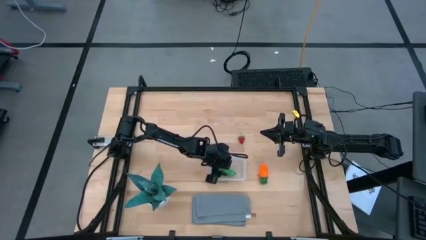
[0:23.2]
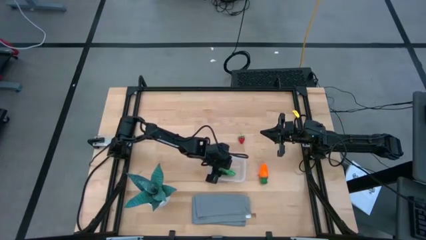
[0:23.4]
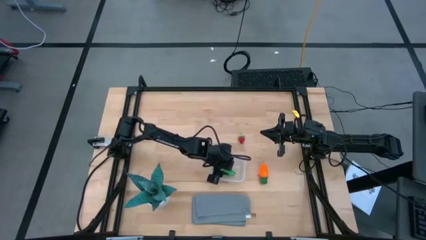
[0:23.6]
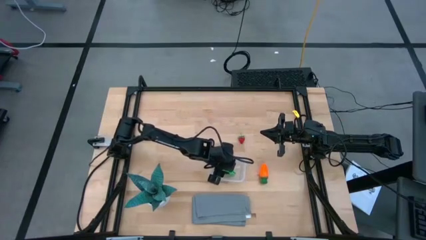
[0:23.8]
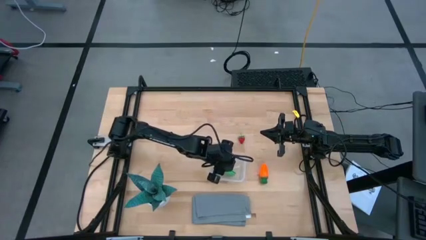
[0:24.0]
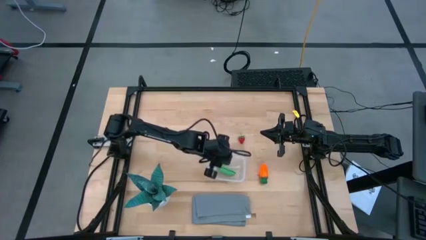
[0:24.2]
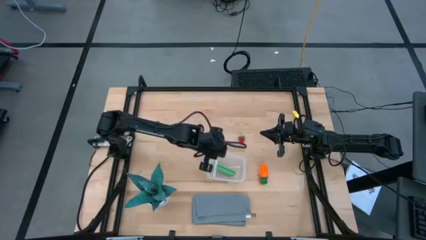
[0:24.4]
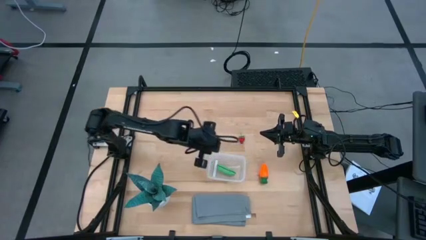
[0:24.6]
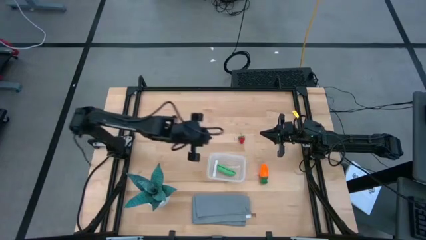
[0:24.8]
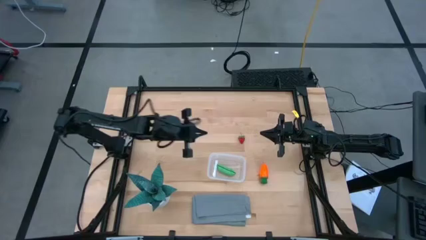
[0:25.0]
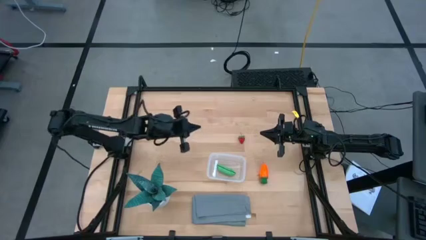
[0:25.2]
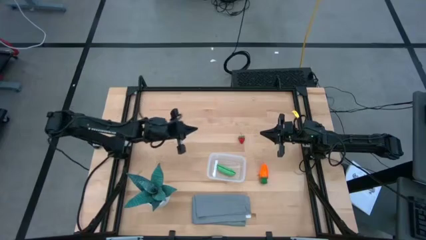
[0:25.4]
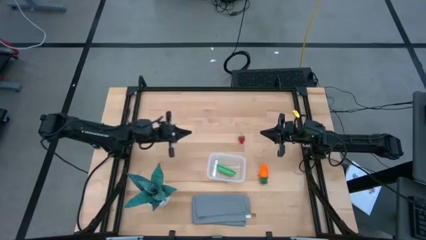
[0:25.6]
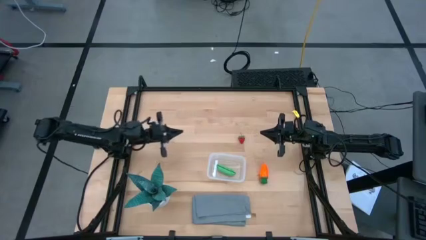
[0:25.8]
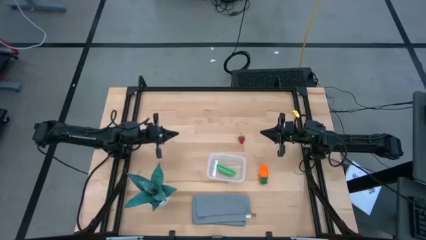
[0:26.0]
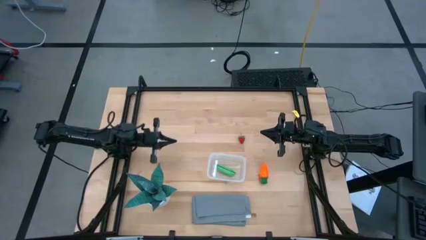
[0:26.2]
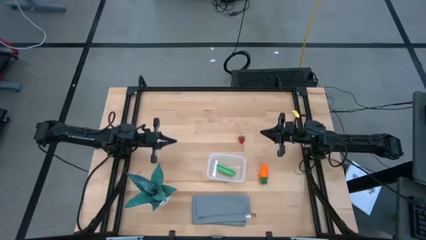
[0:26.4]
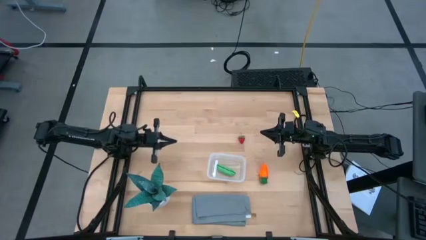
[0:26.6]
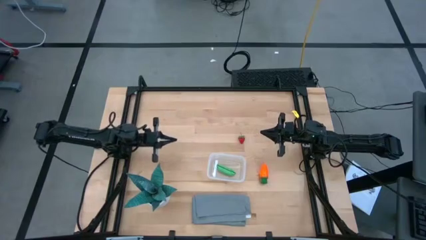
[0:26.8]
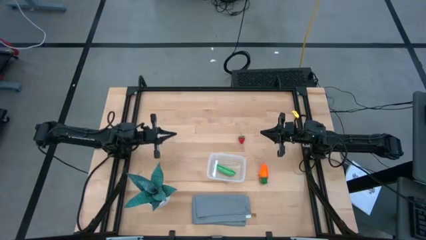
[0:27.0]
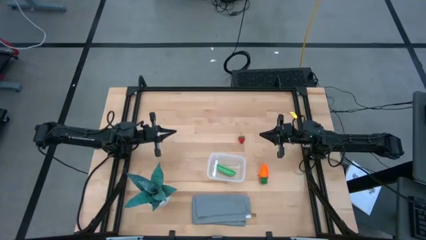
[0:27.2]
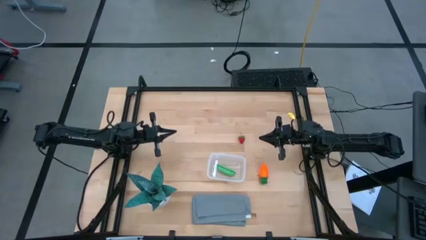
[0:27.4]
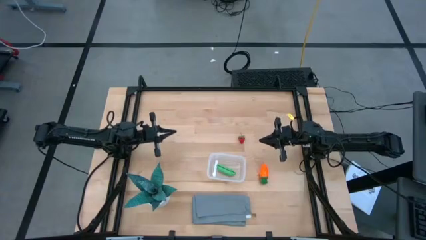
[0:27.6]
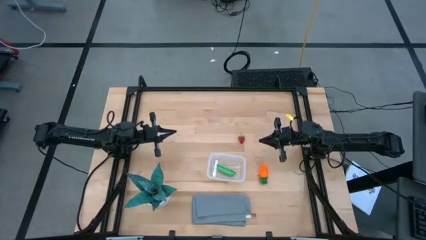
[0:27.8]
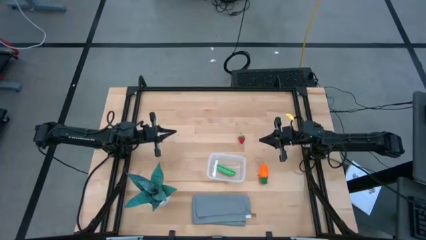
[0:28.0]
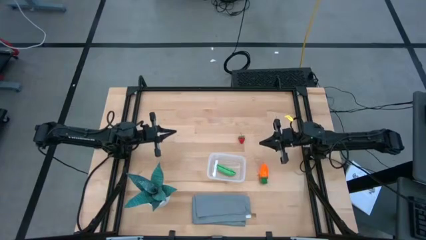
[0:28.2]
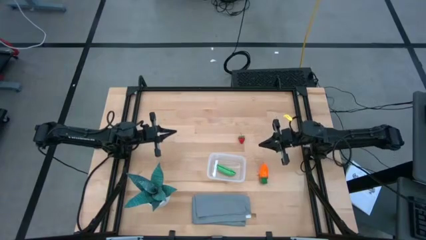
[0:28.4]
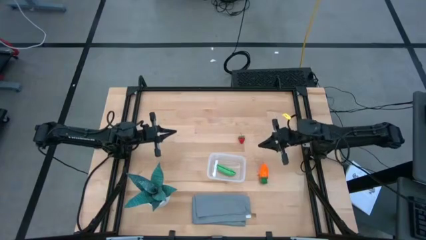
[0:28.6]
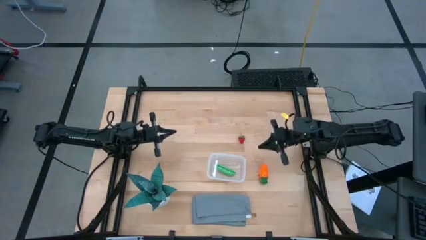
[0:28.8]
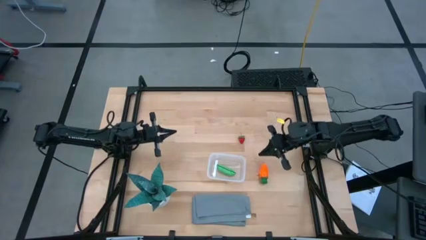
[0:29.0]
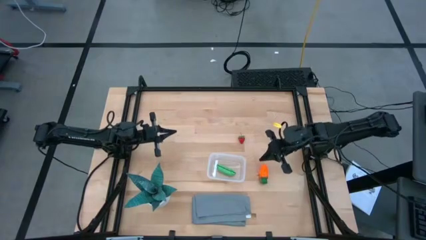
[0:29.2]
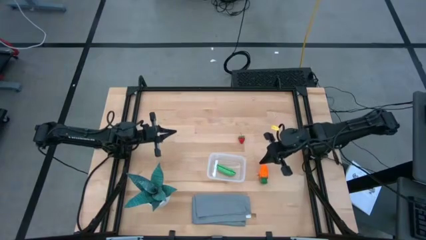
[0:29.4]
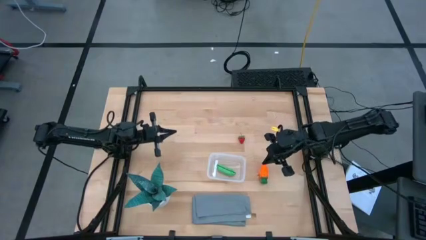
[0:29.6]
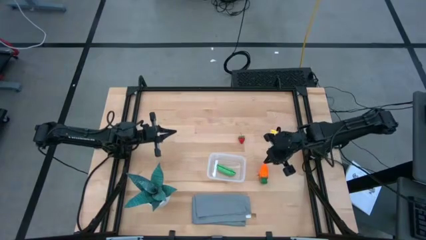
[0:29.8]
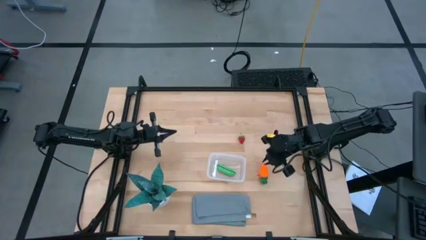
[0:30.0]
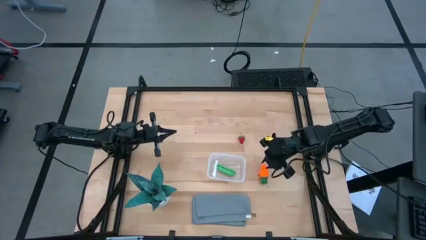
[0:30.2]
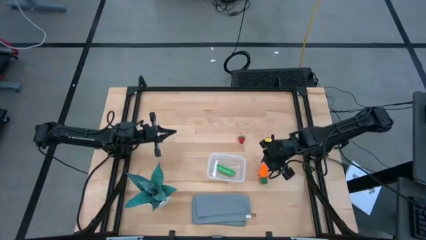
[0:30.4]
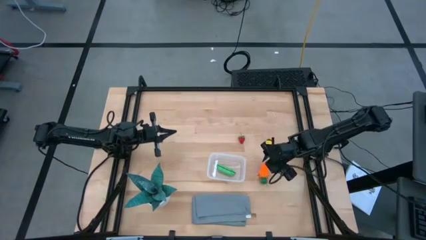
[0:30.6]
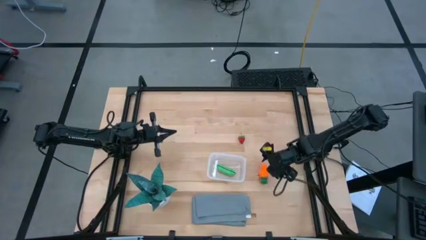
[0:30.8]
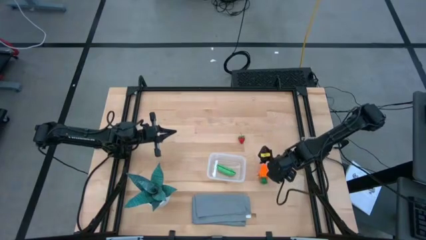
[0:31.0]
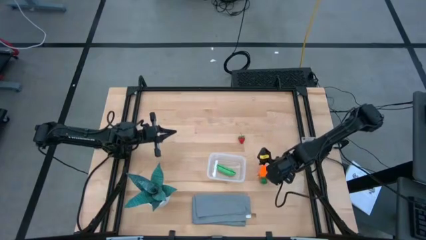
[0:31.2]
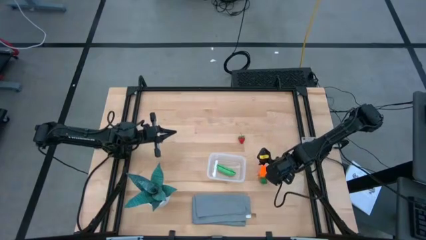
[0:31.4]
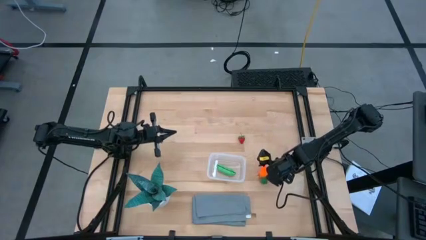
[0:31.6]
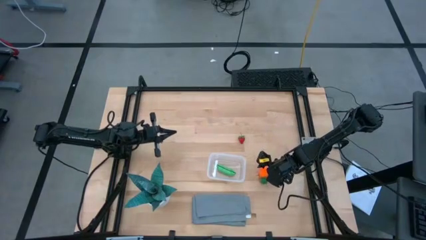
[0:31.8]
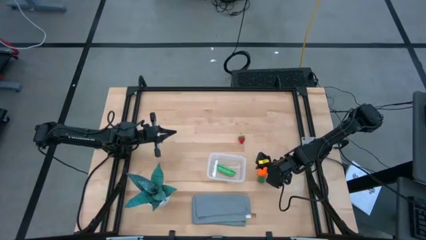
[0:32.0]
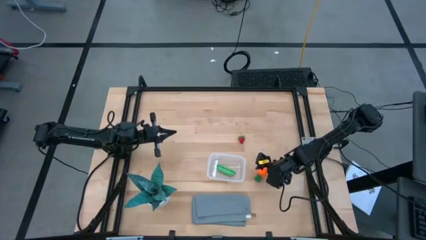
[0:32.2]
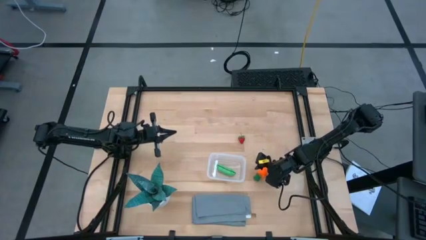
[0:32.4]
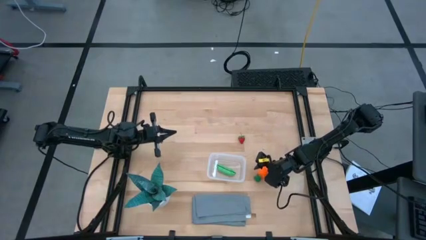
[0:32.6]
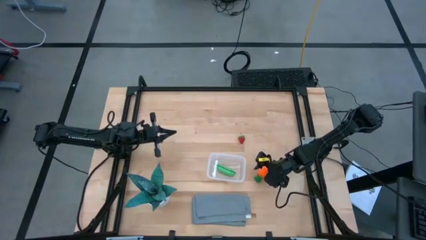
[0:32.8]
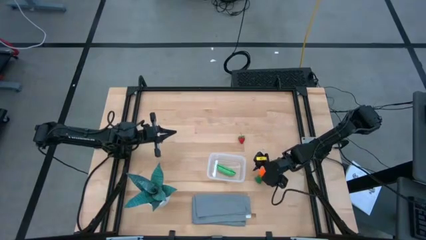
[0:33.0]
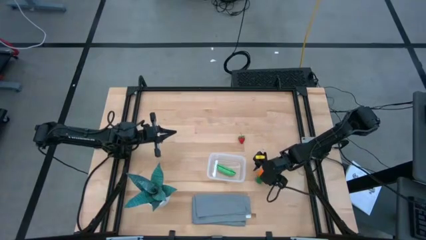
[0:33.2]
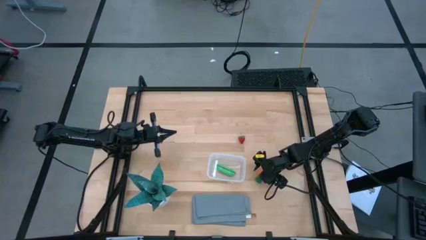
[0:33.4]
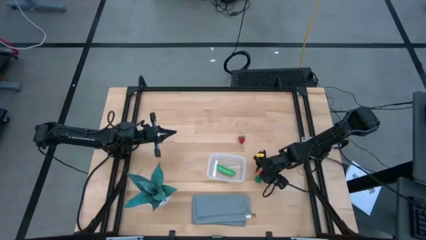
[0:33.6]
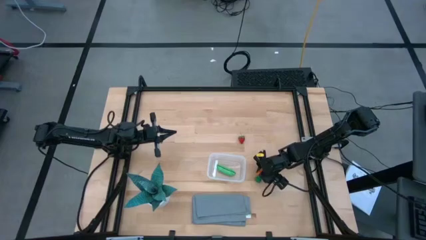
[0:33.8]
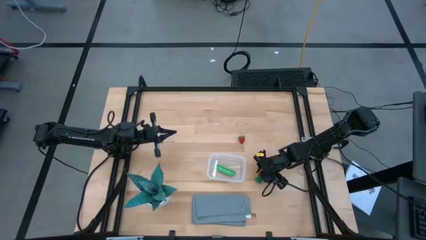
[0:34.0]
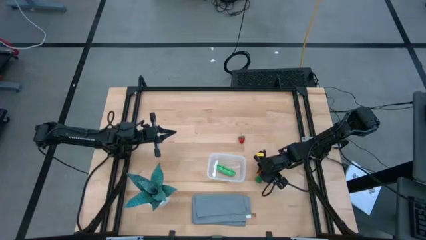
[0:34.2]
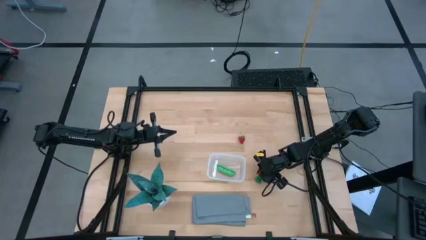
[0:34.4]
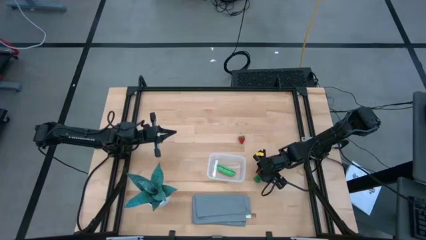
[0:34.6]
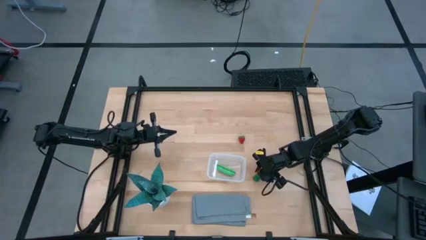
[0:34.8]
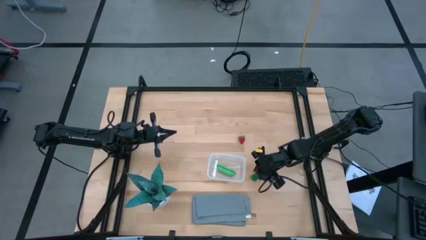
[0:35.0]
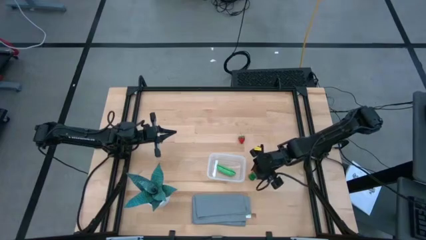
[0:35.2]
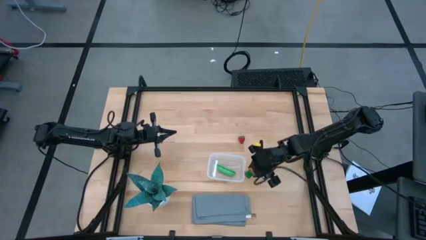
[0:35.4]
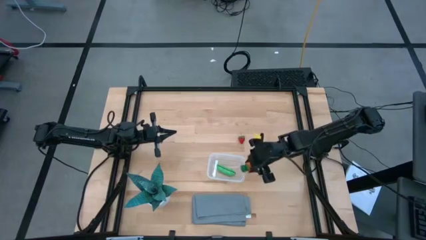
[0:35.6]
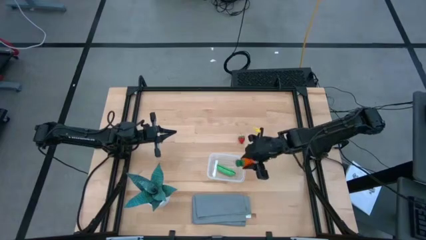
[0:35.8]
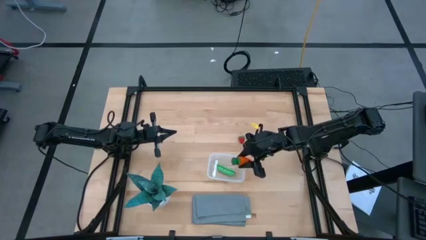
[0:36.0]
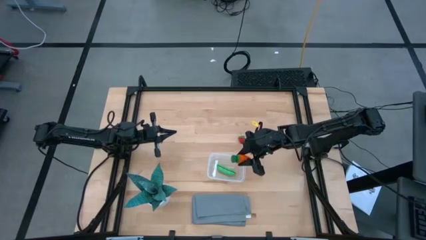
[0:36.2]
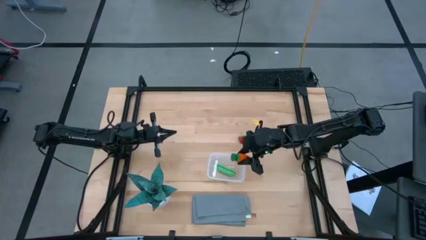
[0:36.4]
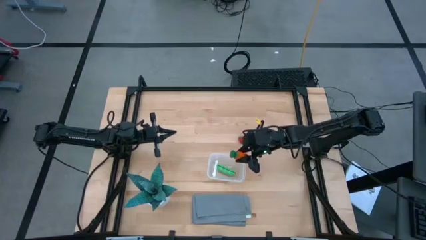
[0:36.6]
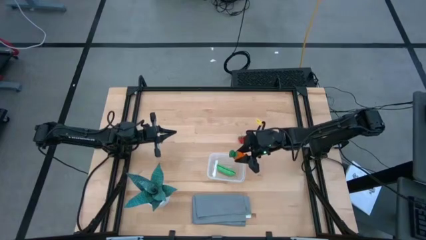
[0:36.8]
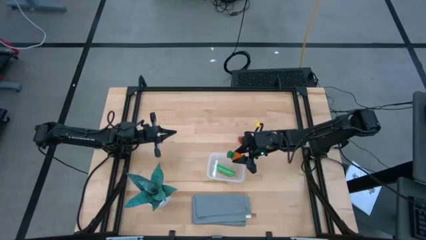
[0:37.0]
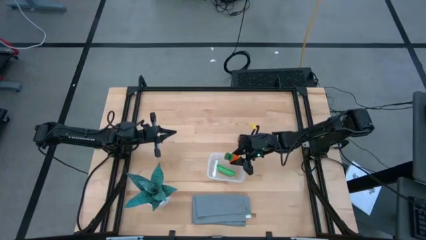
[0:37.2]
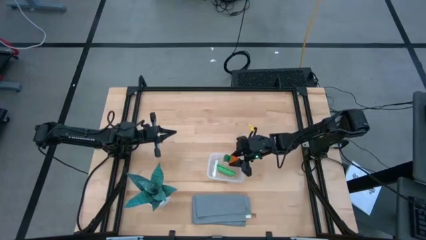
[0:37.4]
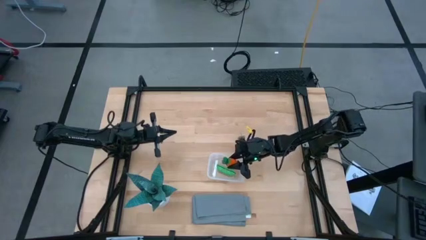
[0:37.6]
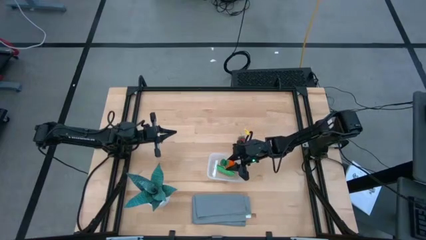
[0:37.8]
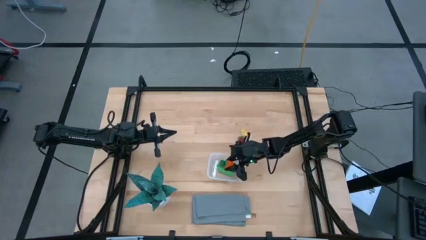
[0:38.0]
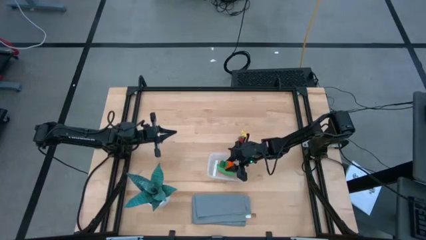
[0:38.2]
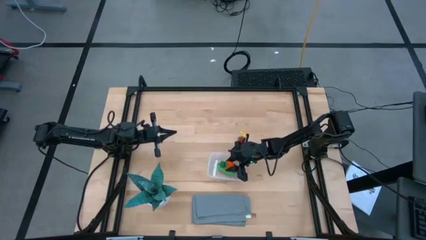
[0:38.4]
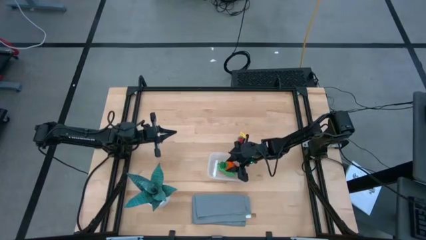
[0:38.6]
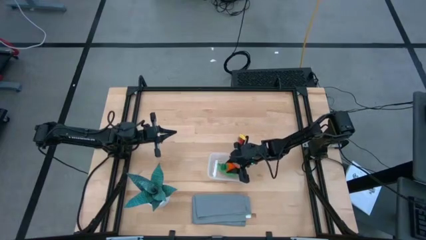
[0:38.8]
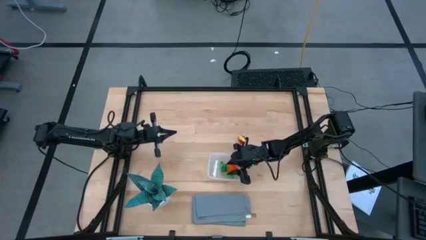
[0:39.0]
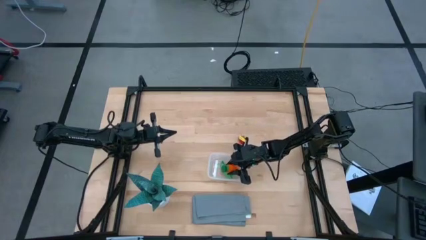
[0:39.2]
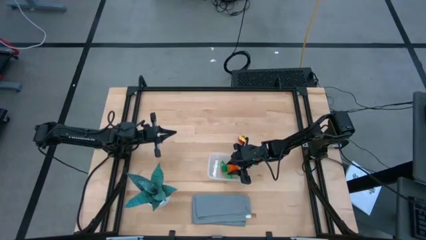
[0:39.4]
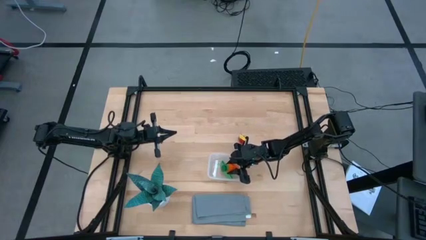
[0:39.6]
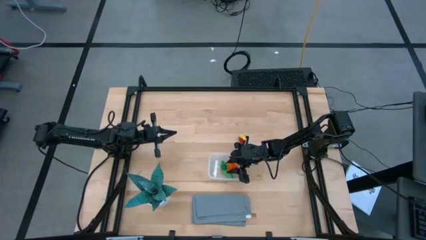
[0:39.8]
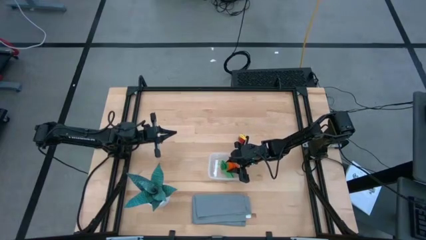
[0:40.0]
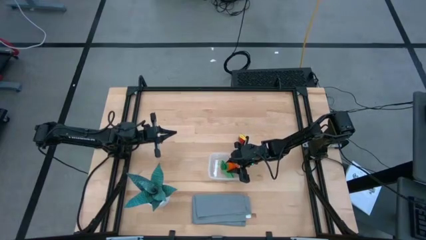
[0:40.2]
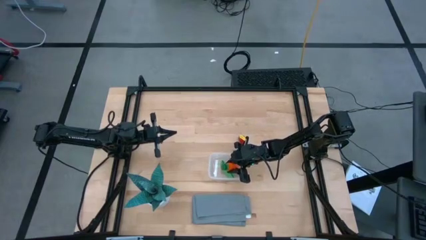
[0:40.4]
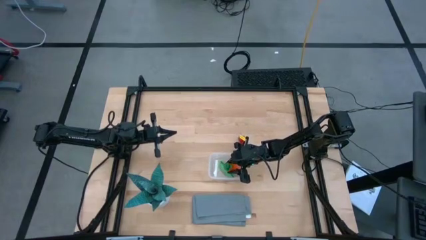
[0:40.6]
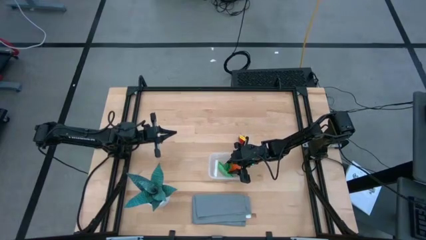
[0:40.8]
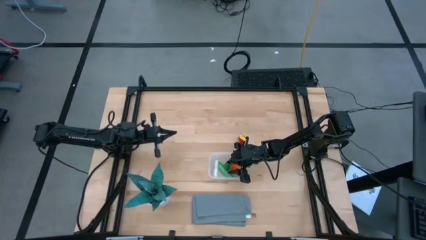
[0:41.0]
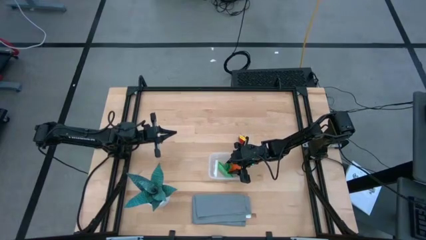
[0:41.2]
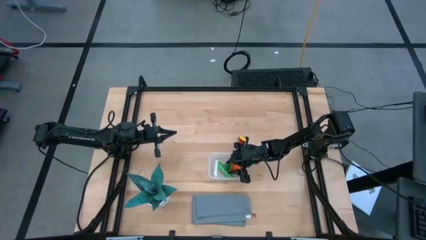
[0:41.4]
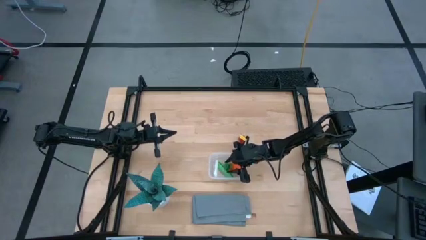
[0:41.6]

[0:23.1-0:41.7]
Task: Pick and placing Produce into tupperware
Put the orange carrot into the transparent bin
